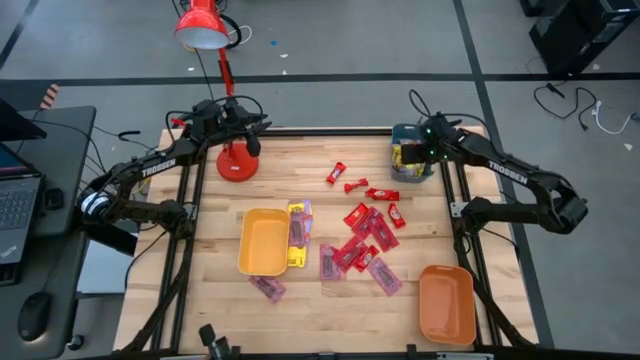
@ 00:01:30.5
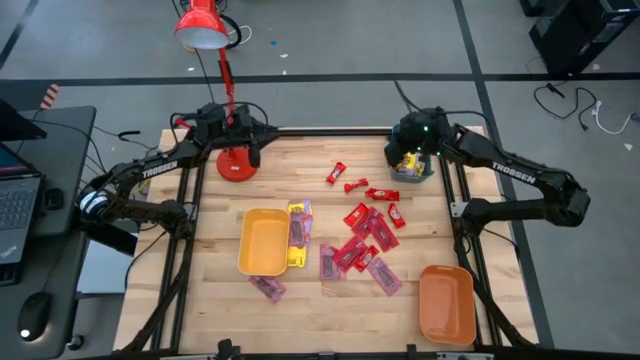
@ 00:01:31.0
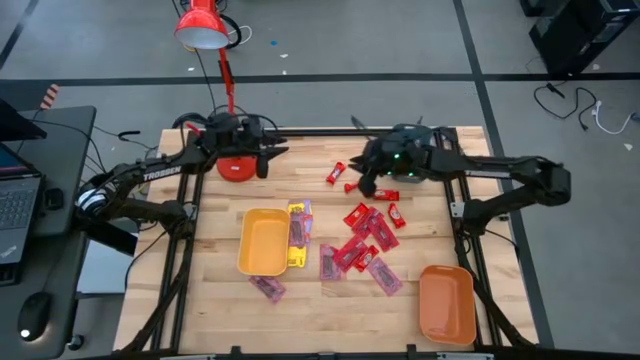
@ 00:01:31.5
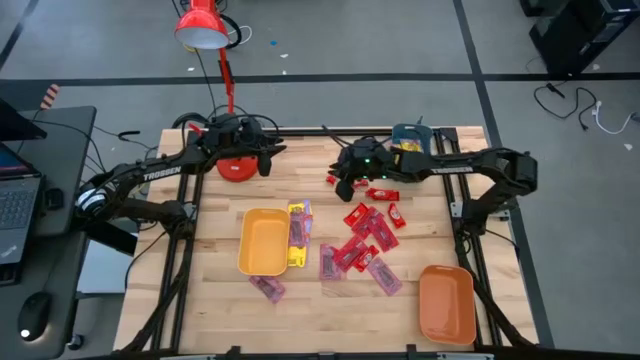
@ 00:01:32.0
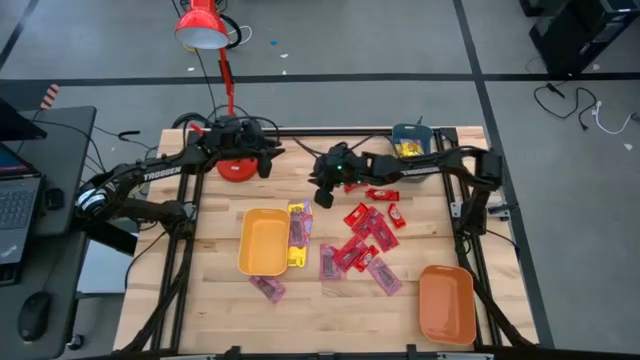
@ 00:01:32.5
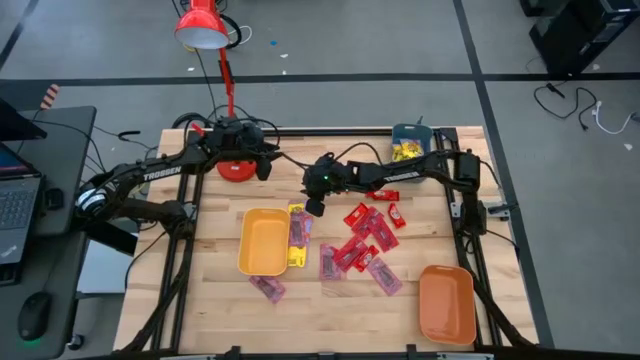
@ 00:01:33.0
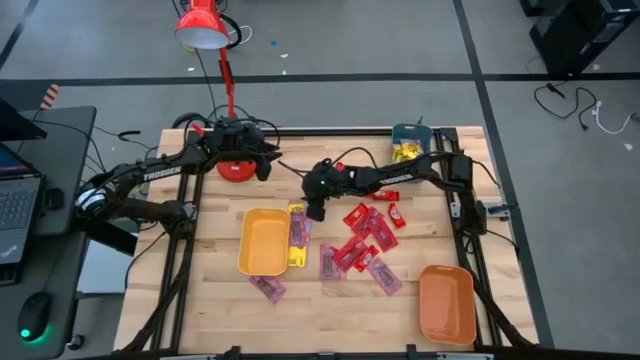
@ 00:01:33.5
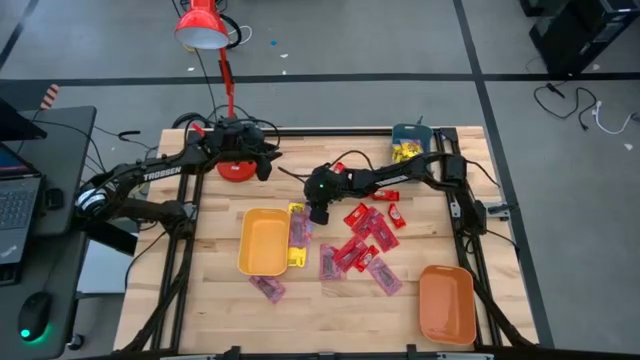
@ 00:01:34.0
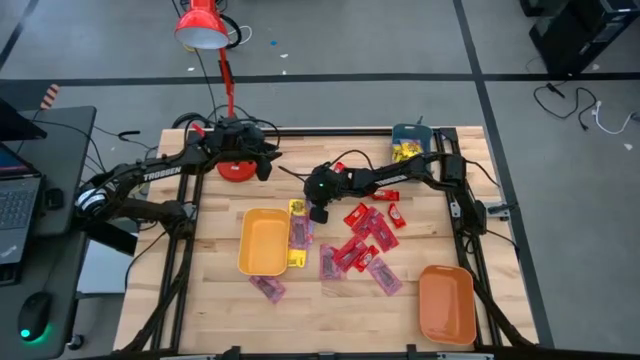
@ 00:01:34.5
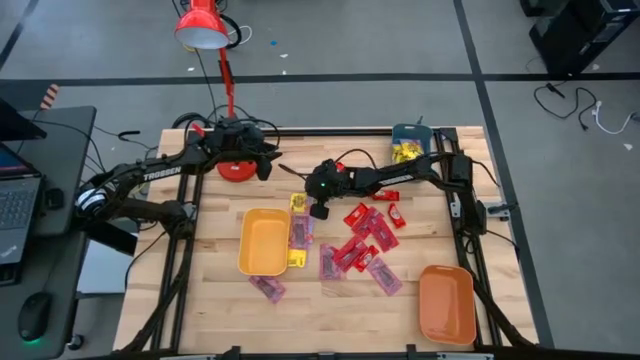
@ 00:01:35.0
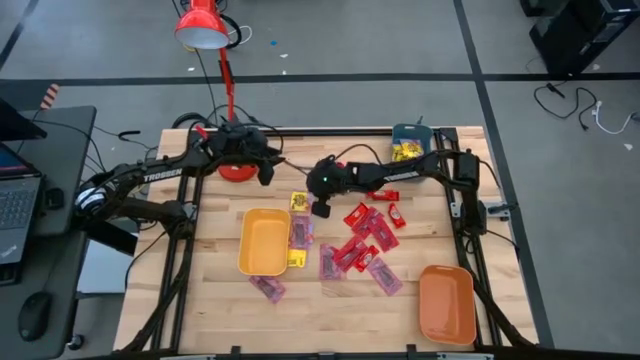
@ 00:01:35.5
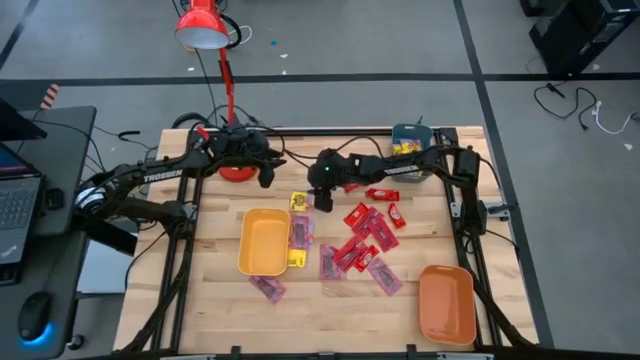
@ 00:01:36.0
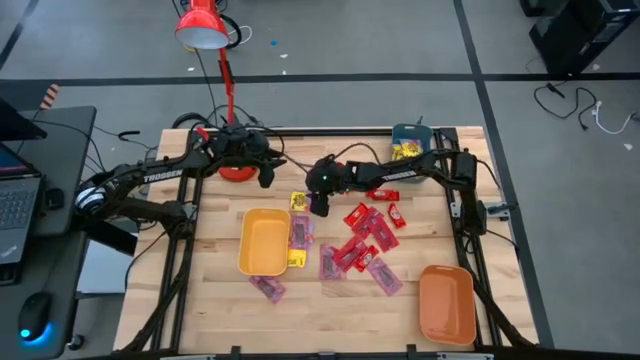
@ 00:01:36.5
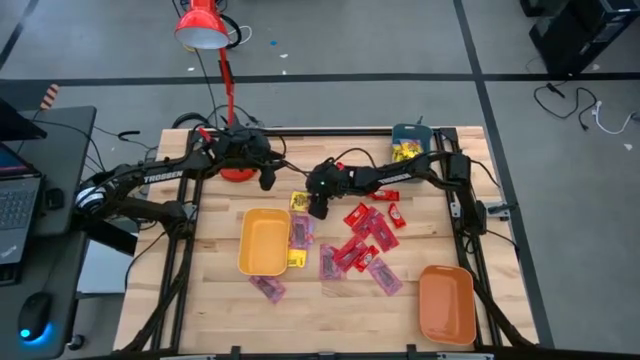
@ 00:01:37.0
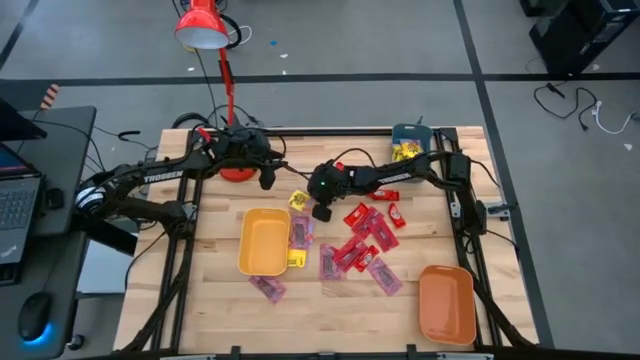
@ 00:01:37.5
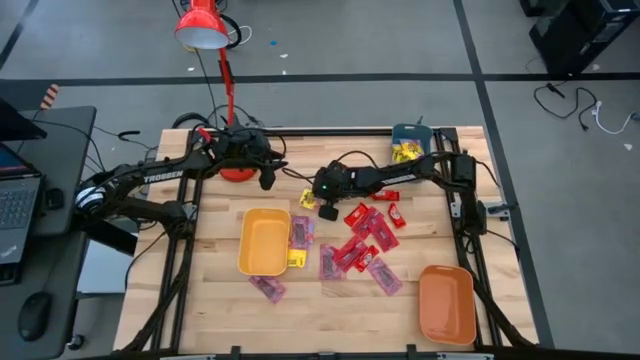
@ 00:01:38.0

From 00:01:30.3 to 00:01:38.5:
Task: Sort candy
Put the yellow candy pack into the blue bin

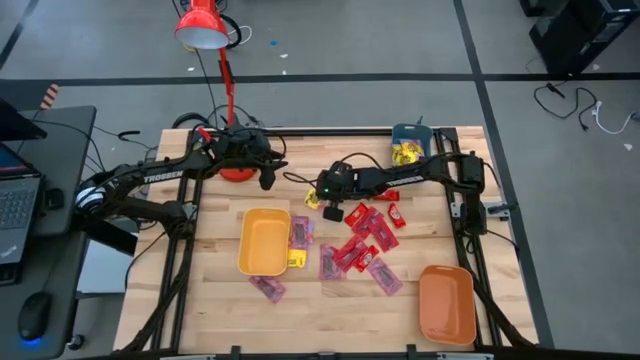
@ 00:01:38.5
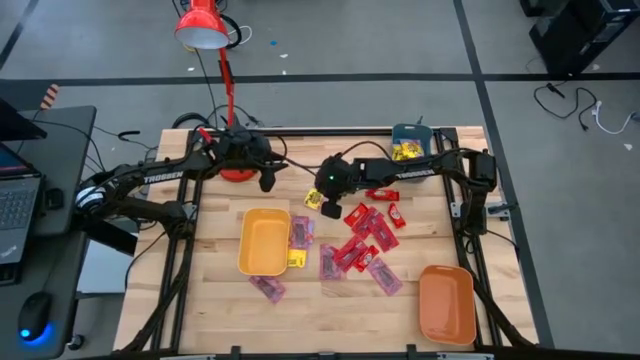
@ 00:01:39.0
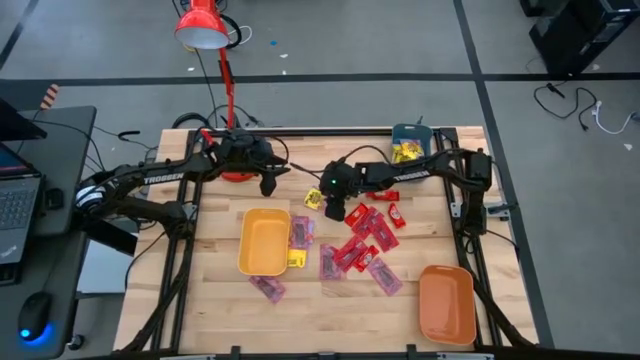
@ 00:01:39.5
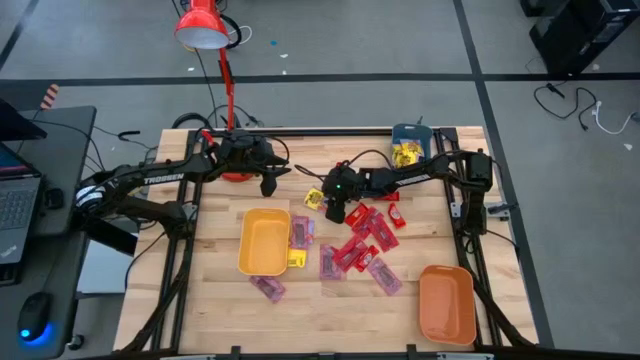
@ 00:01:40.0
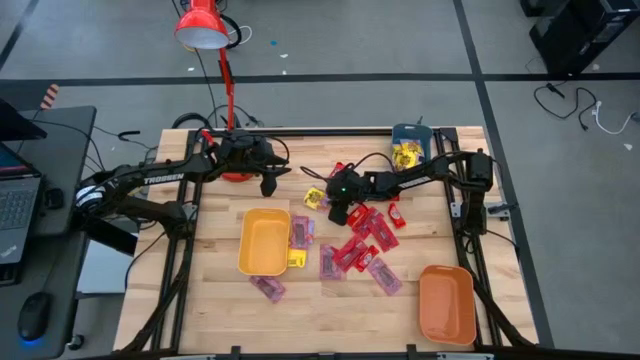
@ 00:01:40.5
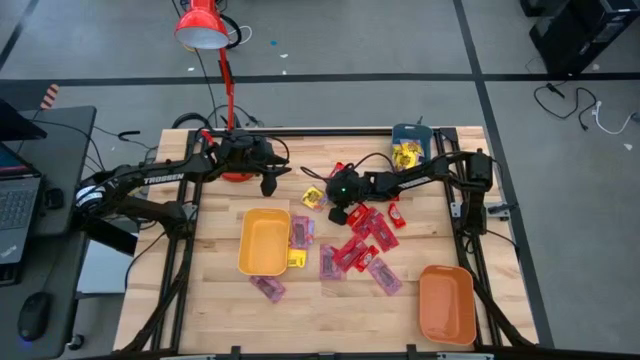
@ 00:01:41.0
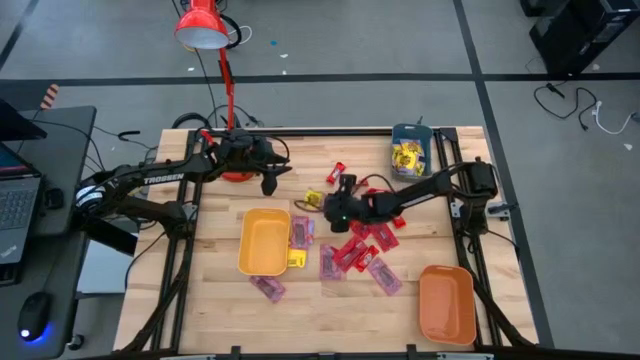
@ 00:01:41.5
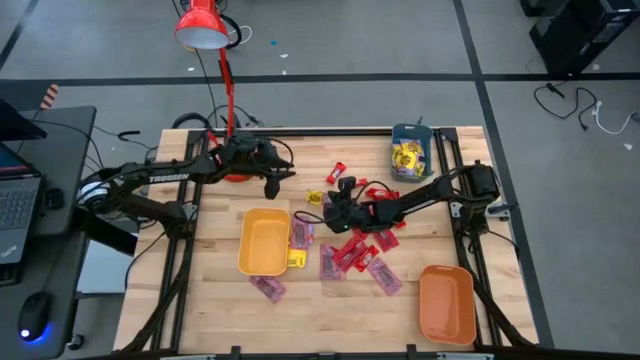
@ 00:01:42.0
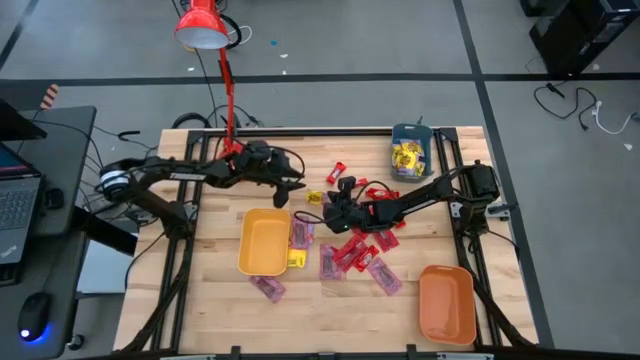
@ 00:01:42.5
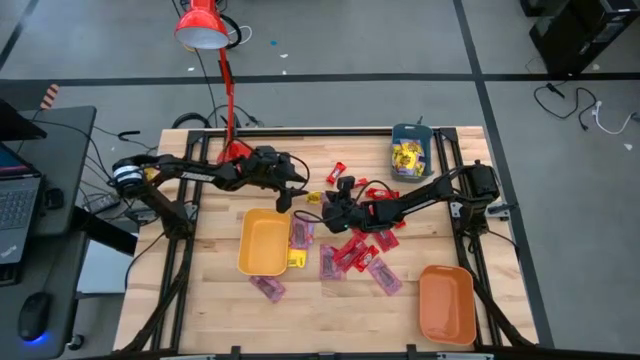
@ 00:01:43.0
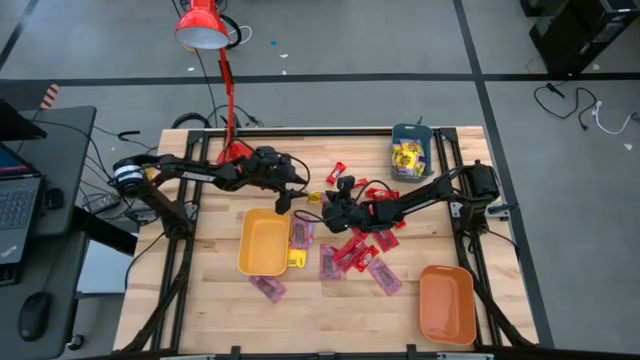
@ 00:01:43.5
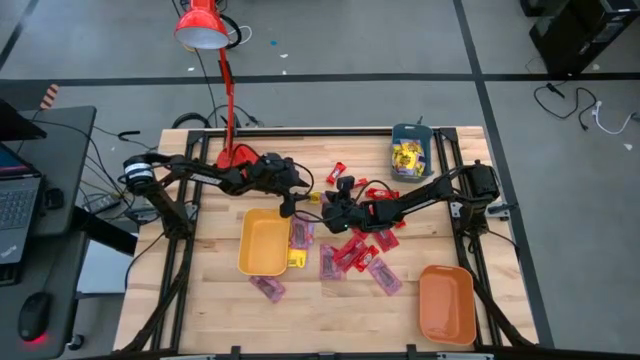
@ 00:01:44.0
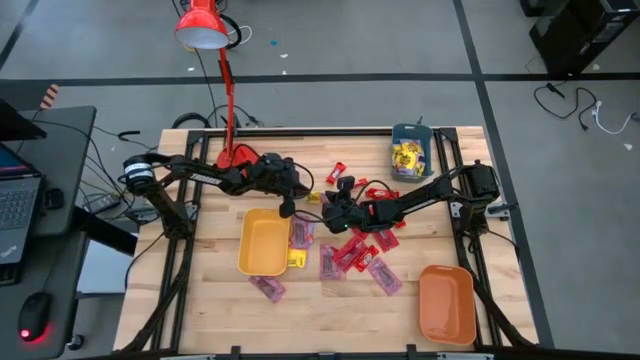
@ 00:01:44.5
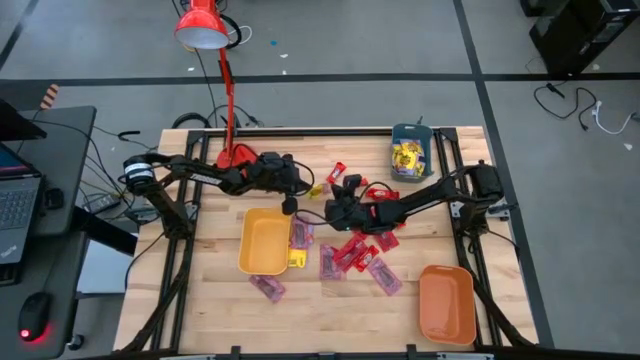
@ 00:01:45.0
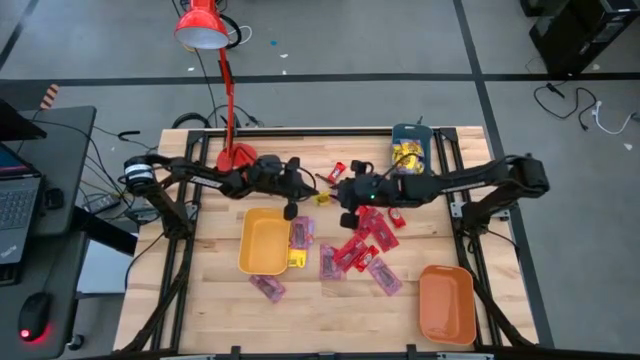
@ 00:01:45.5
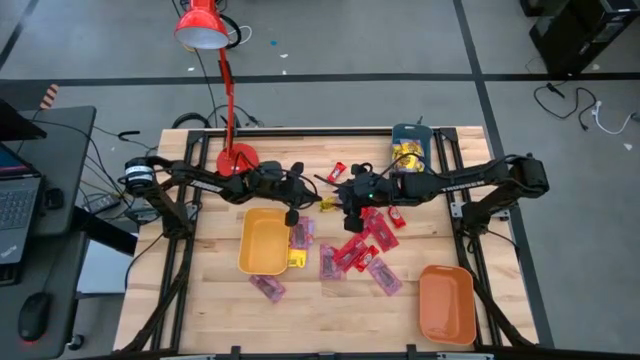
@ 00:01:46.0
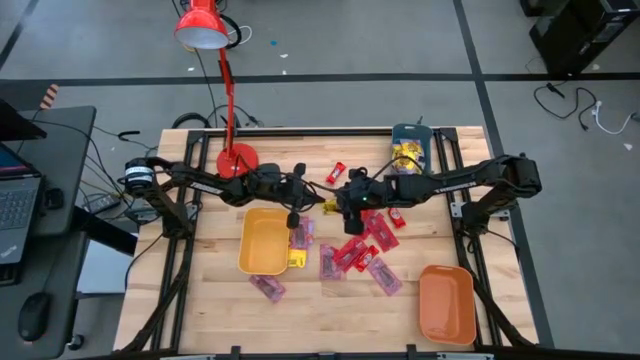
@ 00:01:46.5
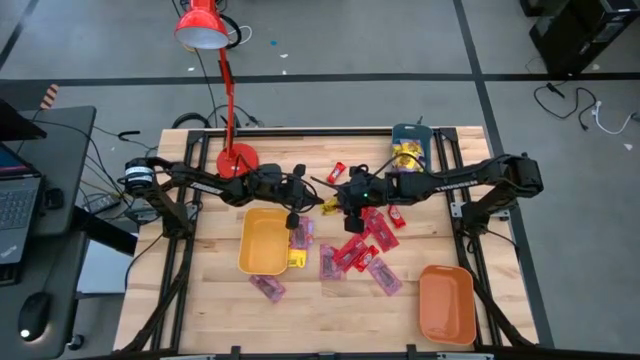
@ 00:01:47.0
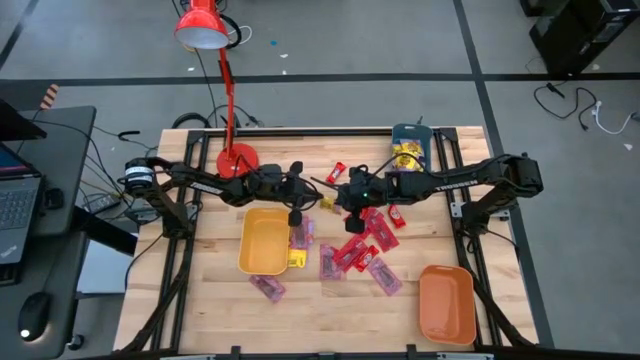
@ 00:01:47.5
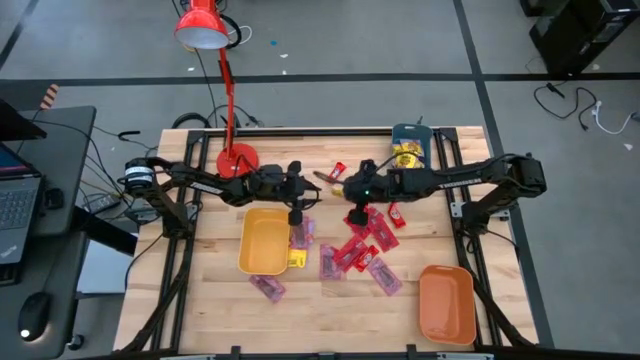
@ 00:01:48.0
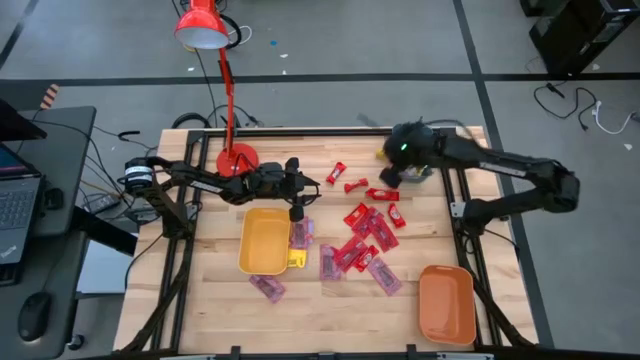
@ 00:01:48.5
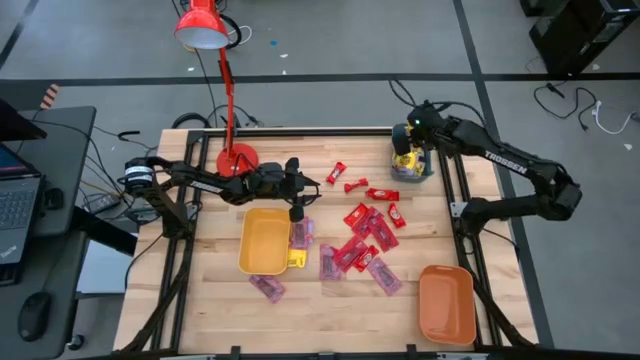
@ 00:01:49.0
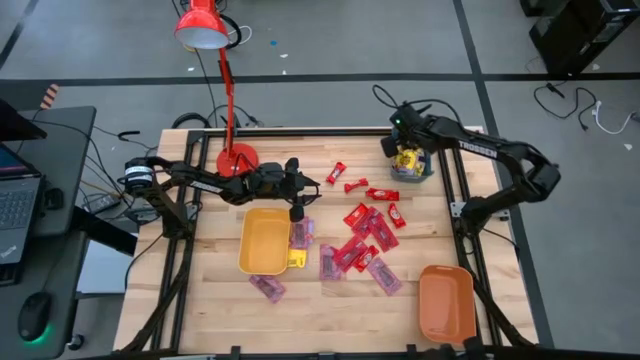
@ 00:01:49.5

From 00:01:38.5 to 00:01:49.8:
Put the yellow candy pack into the blue bin

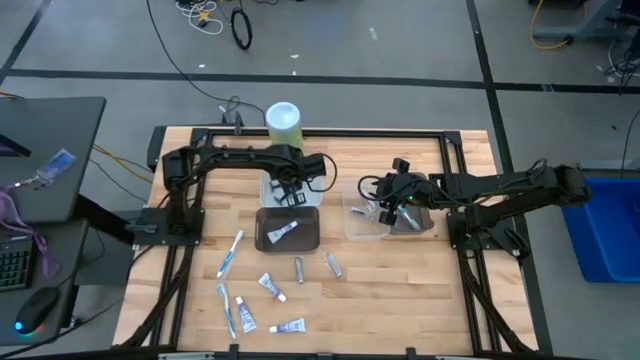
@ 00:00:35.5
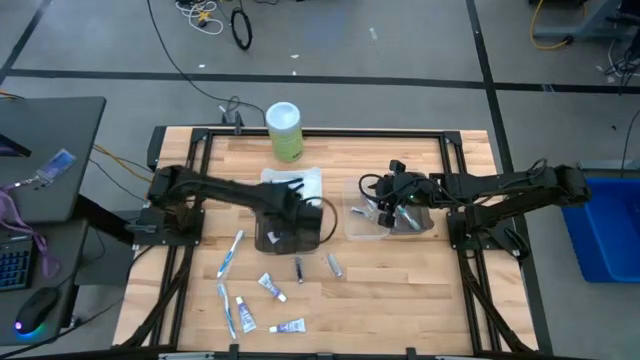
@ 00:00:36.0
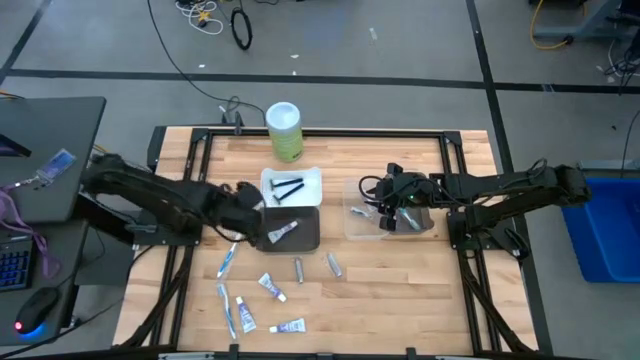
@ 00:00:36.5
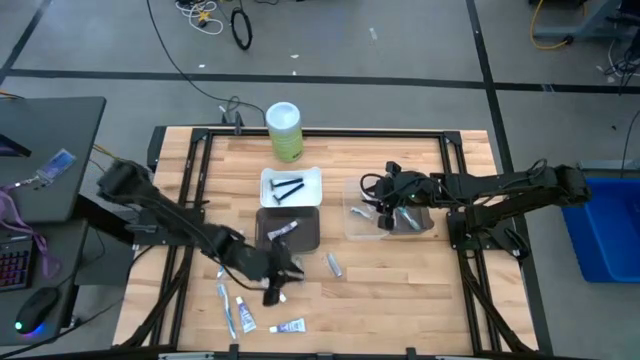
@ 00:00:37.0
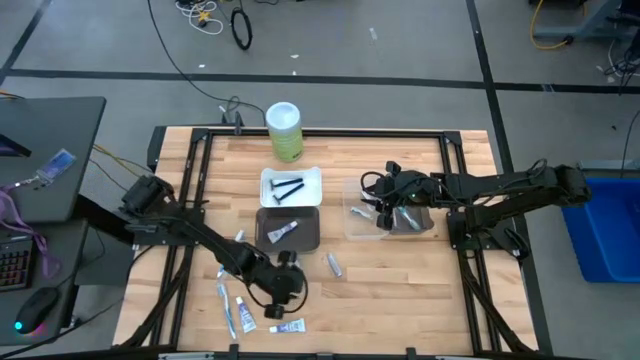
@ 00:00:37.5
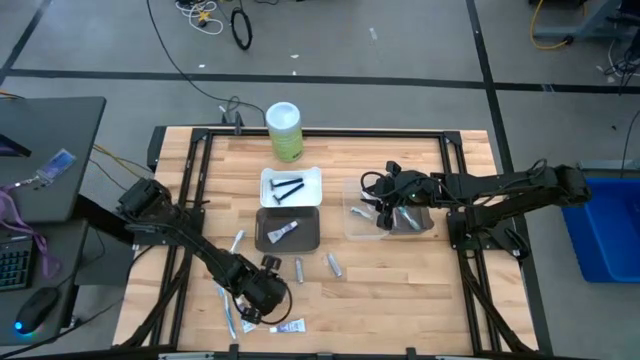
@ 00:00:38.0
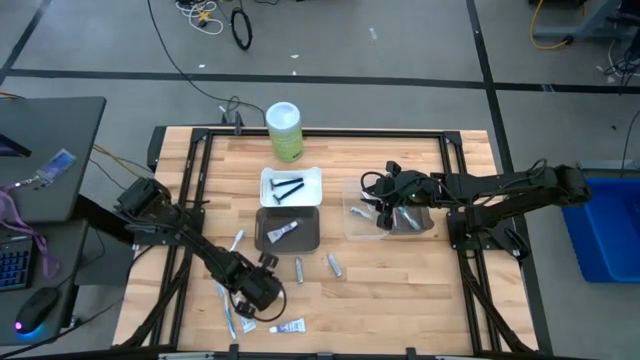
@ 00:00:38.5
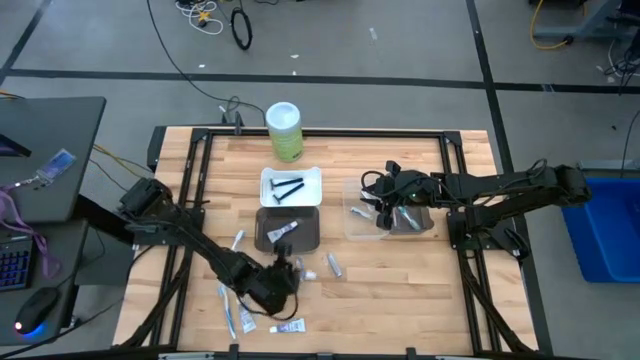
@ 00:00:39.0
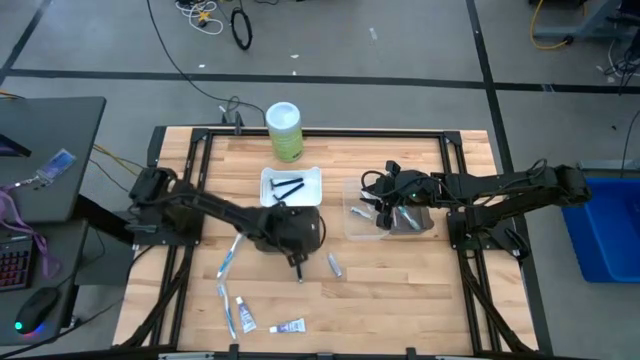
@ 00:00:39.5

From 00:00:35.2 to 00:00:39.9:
Task: Pick & Place Travel size toiletries
Put the white toothpaste into the left black bin
